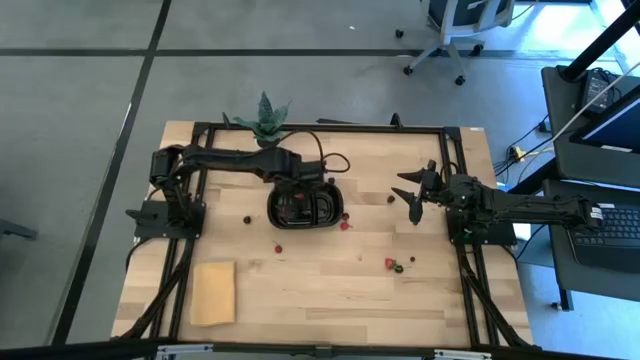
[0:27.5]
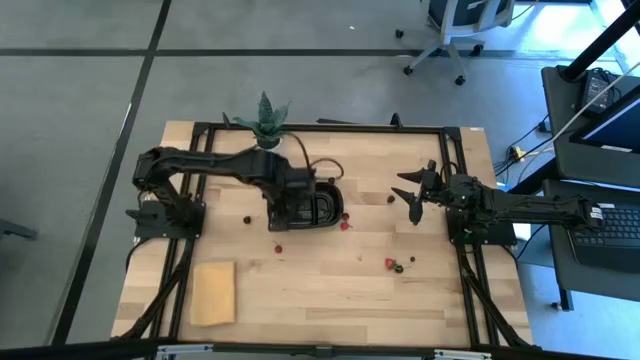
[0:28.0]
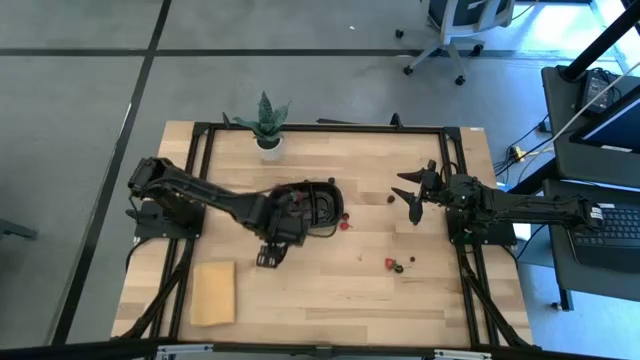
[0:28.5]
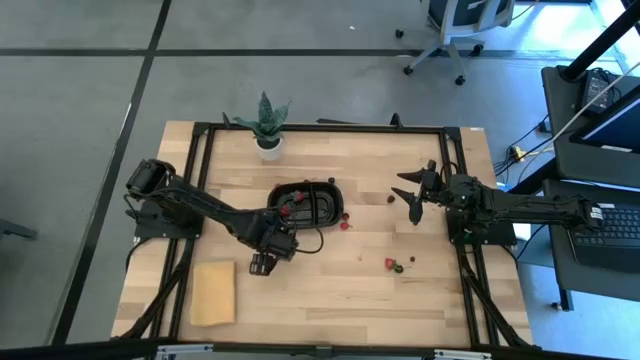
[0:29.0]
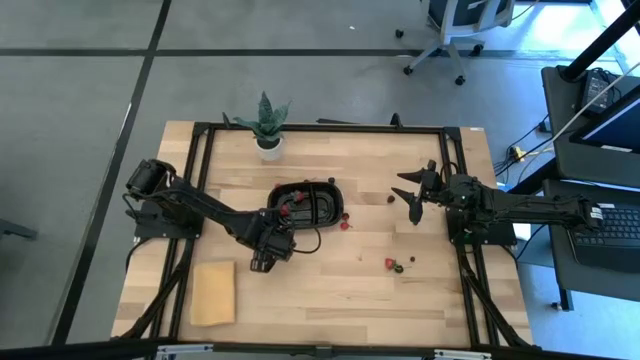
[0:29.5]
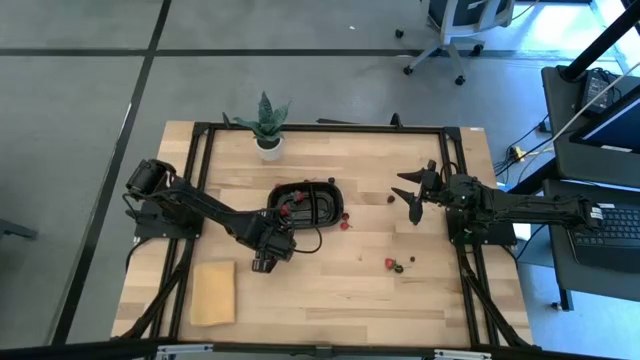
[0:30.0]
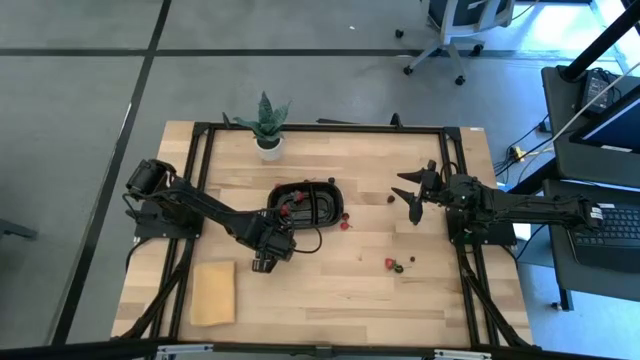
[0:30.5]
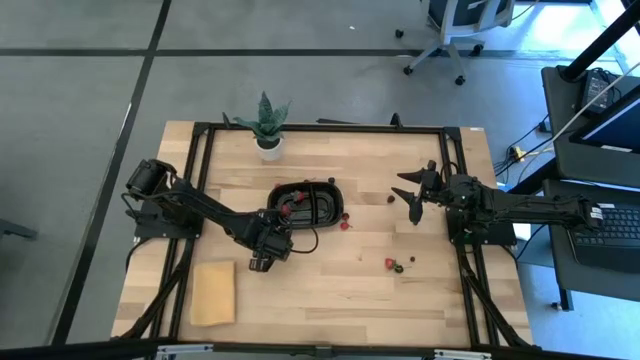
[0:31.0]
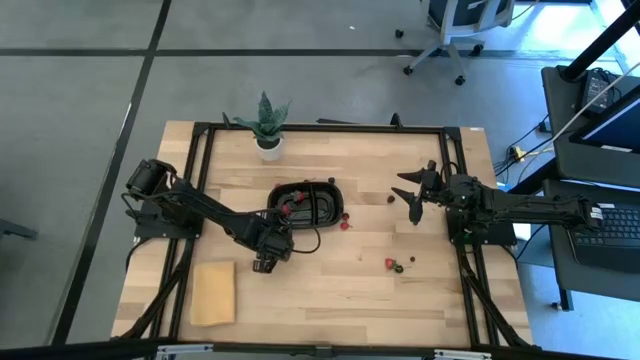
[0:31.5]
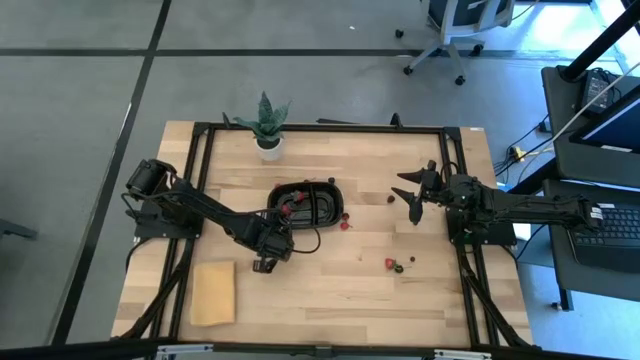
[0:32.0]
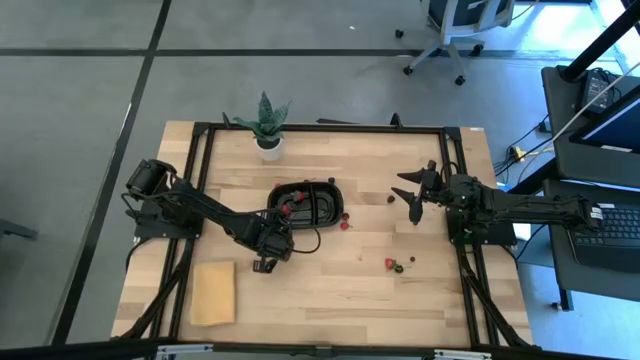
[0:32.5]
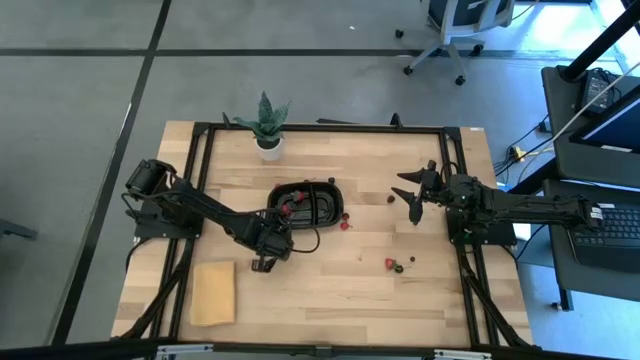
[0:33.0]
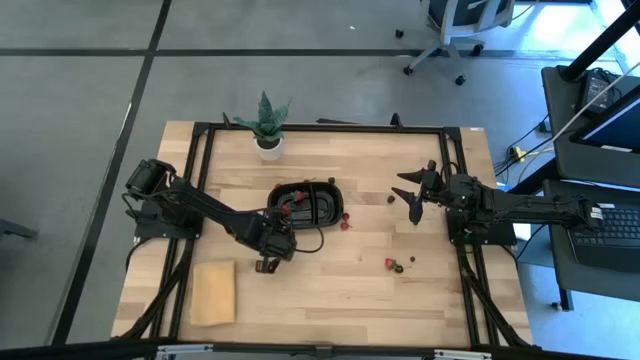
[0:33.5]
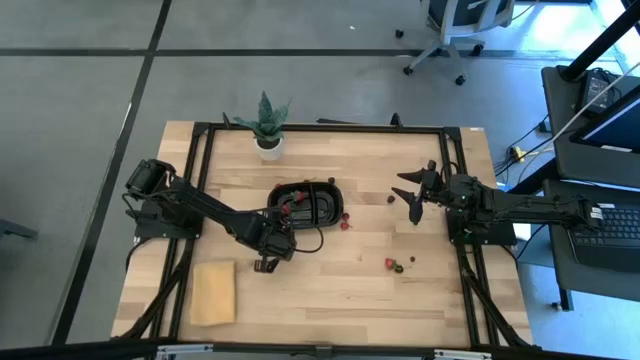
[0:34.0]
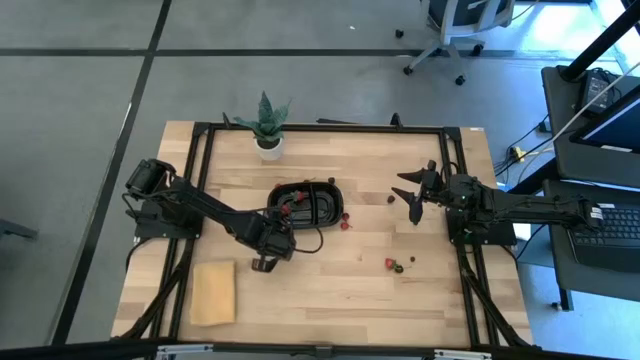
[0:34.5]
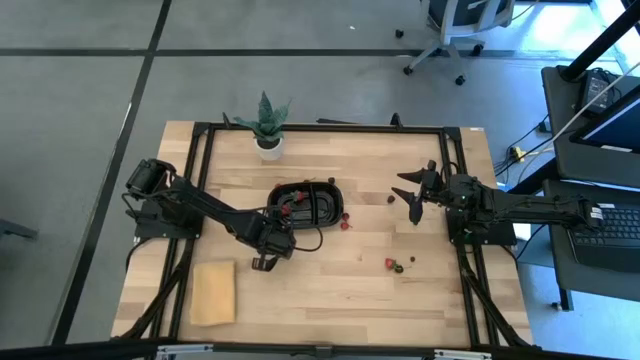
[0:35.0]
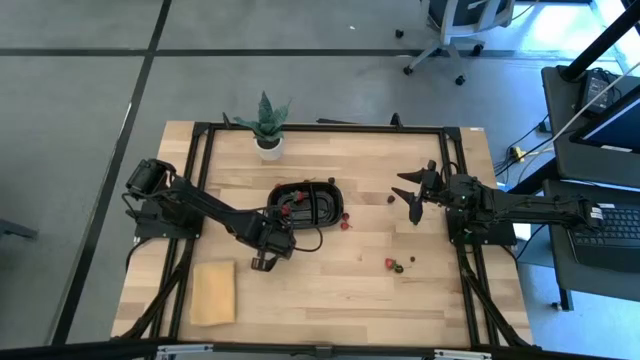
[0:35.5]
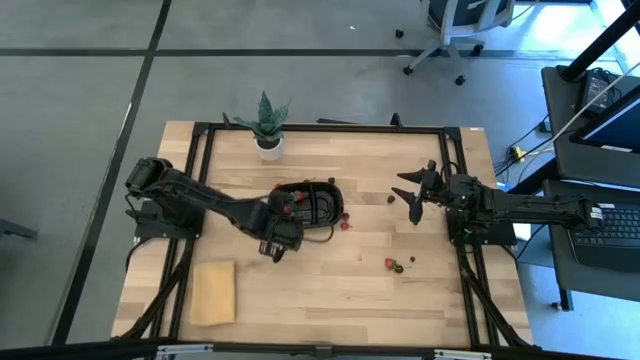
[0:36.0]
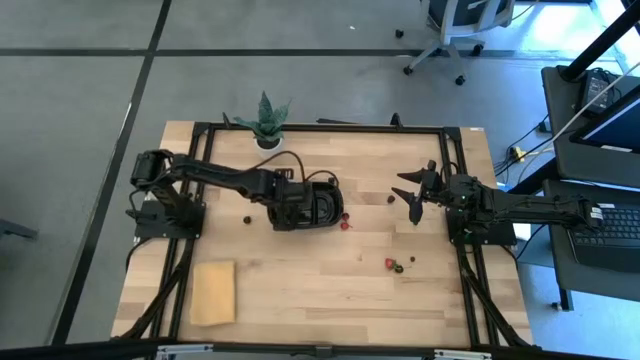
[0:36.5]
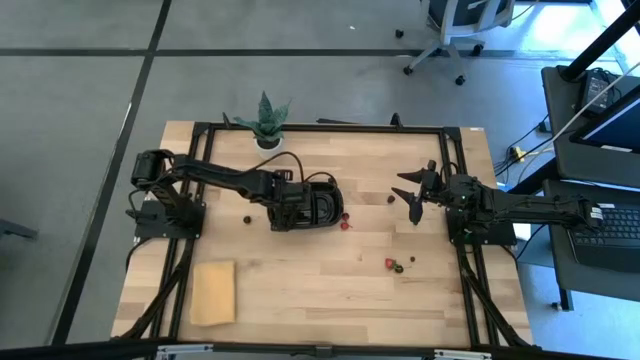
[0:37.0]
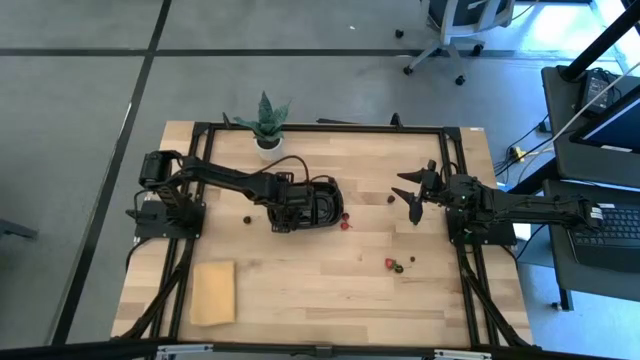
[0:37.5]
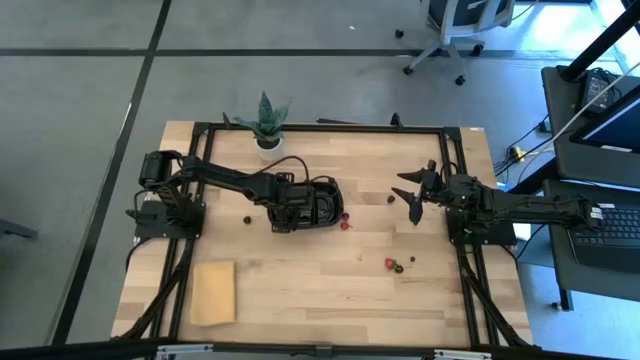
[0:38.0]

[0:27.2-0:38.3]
Task: Pick and placing Produce into tupperware
Put the bottom left red cherry into the black bin

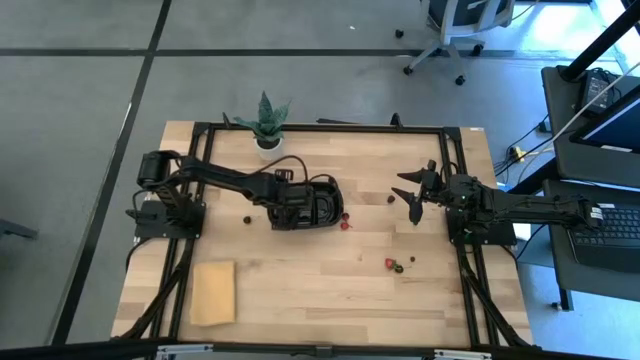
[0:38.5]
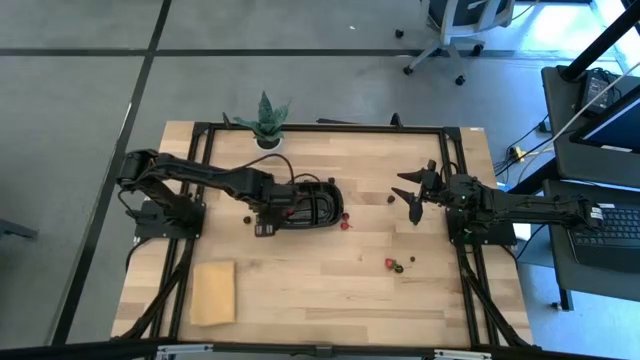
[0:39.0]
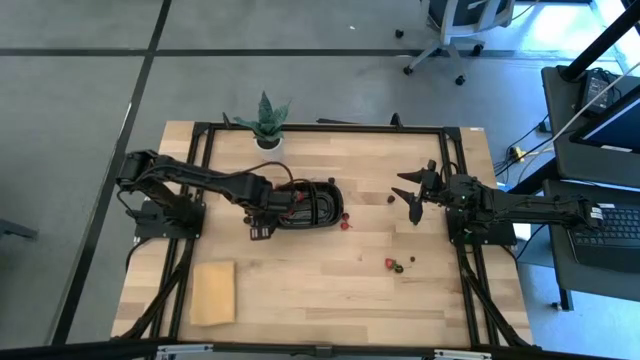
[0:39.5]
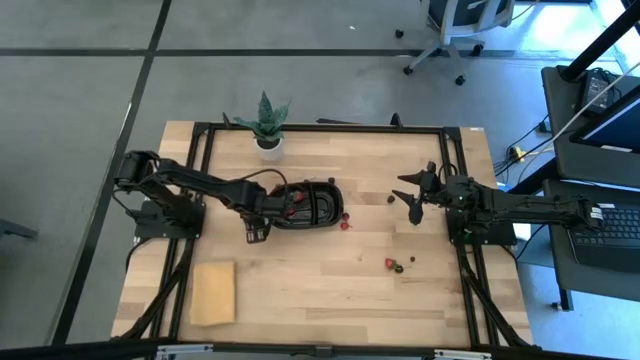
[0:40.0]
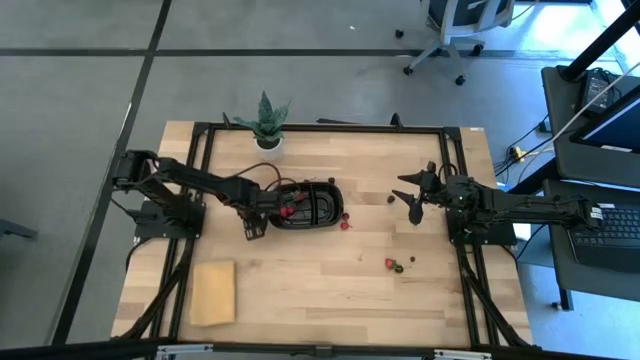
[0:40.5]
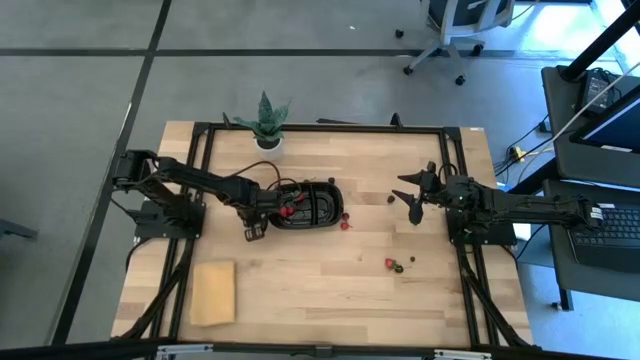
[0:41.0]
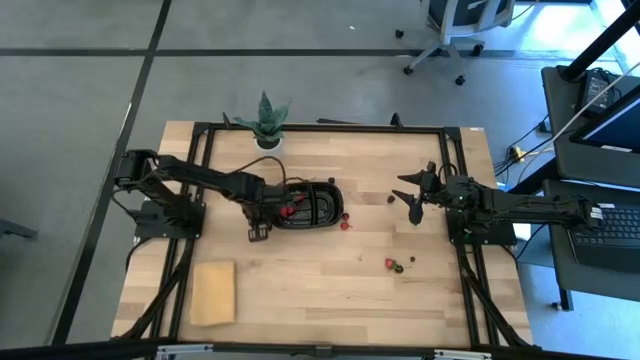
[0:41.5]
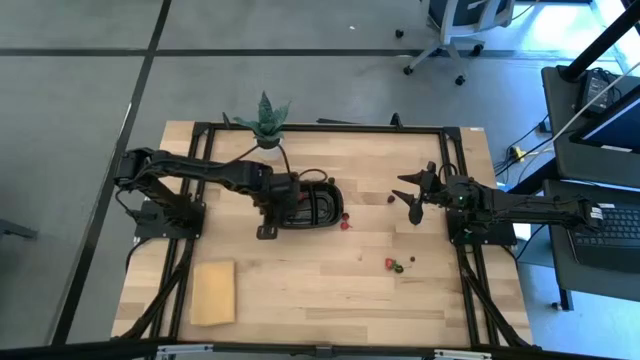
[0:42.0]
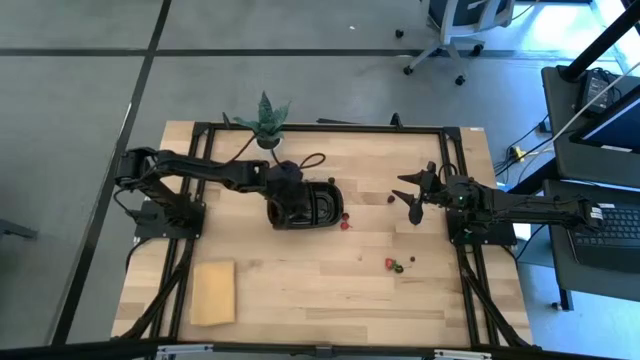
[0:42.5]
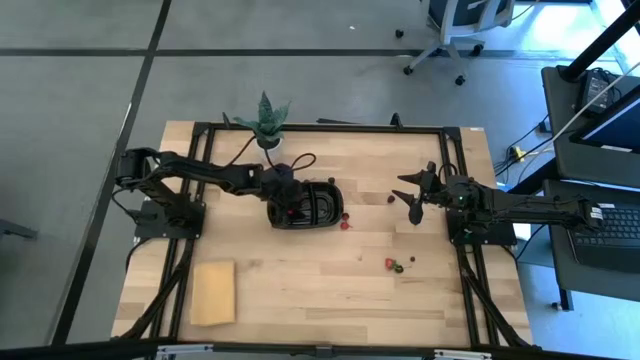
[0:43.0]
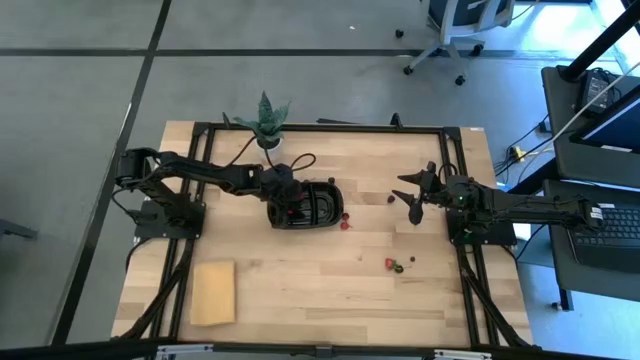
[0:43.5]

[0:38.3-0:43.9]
Put the top black cherry into the black bin

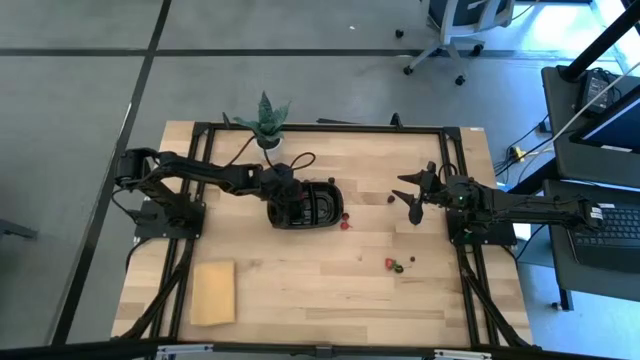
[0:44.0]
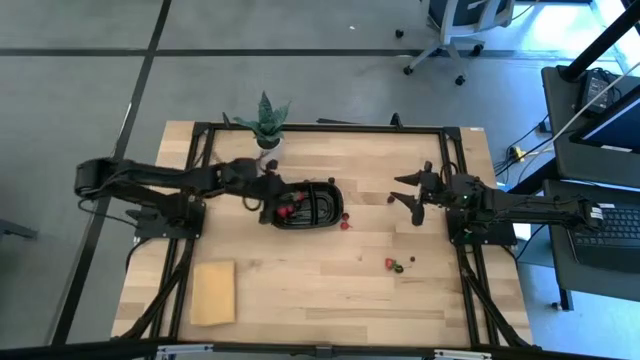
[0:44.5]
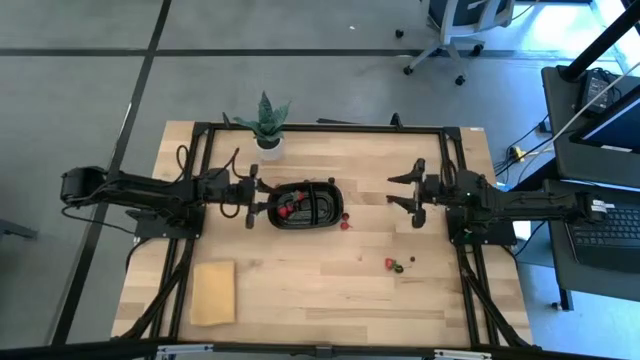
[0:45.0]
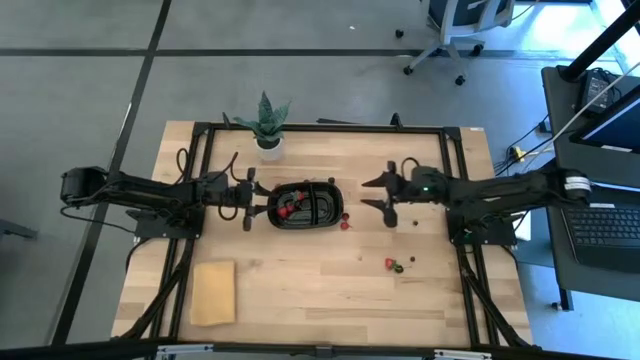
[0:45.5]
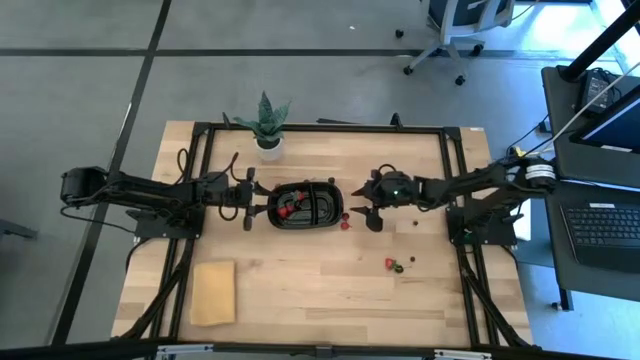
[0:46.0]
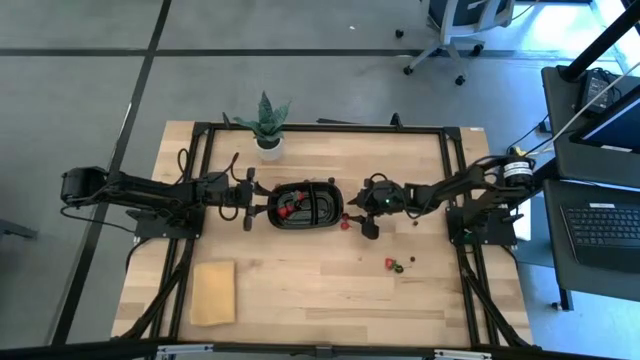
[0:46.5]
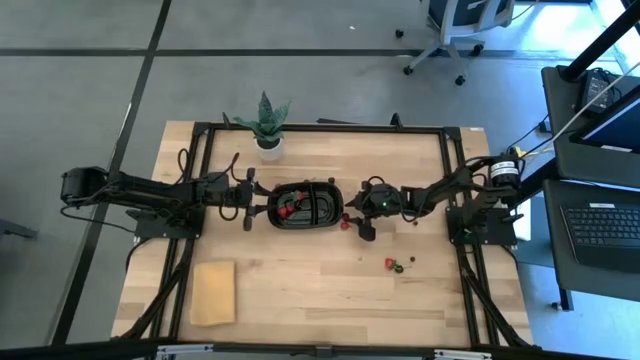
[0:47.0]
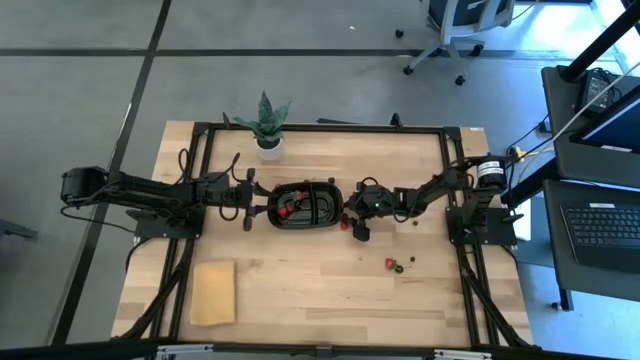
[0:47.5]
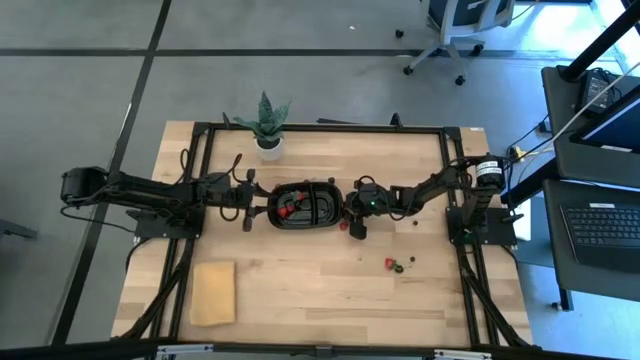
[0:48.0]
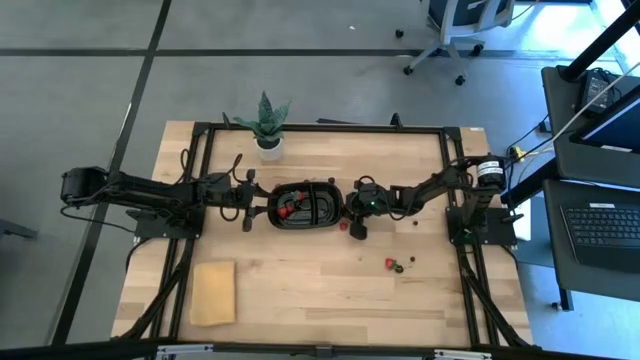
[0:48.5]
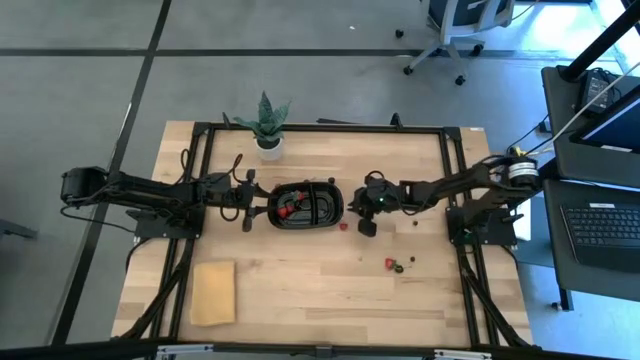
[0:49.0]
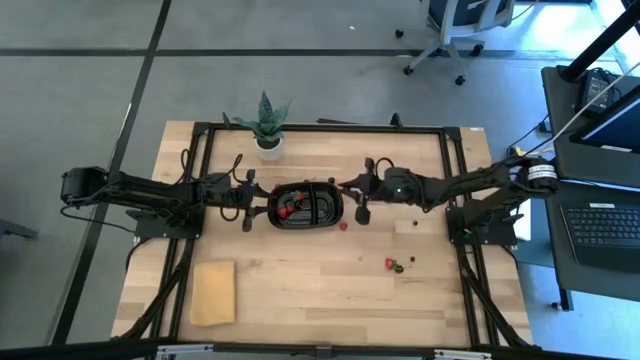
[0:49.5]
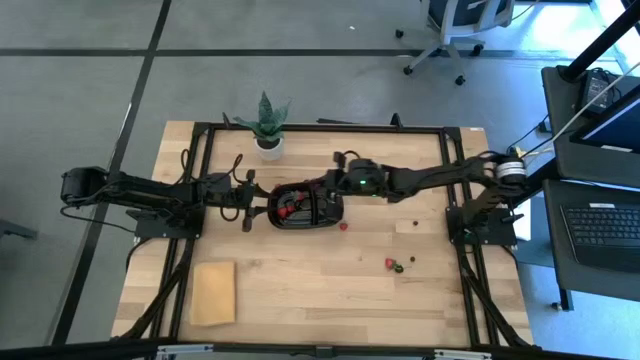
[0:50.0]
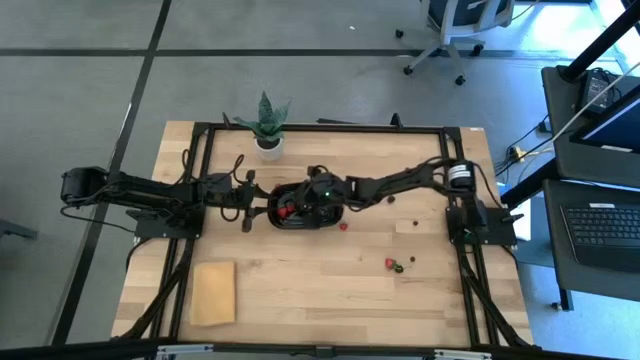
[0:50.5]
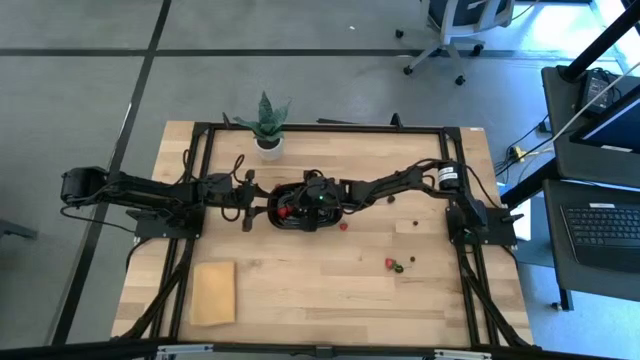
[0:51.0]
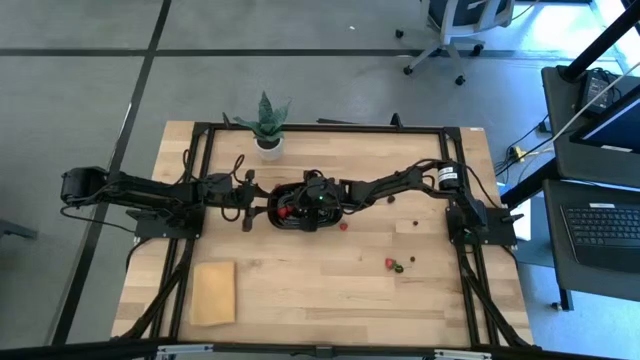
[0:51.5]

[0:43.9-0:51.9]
Put the bottom red cherry into the black bin
